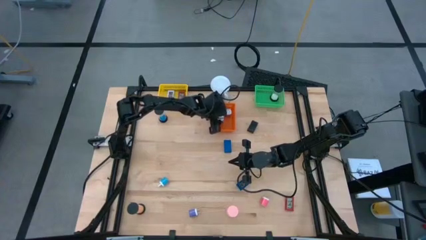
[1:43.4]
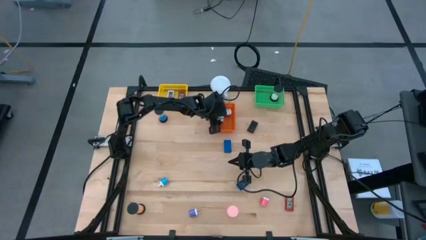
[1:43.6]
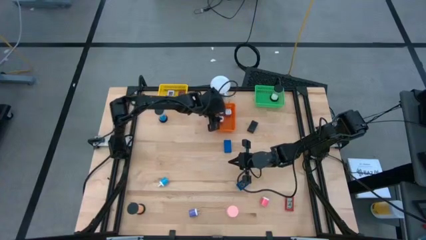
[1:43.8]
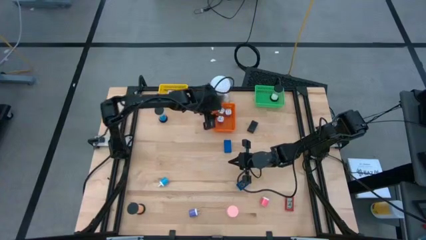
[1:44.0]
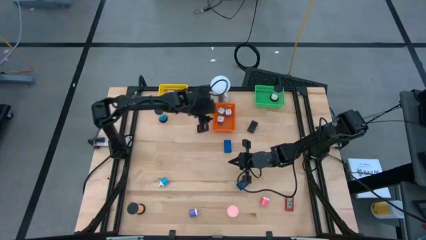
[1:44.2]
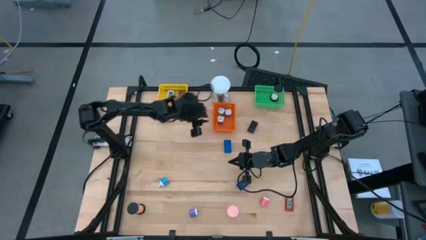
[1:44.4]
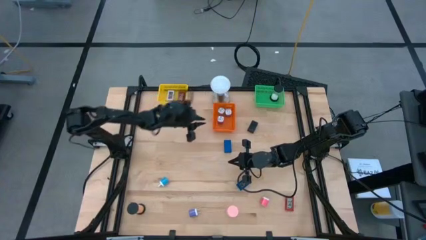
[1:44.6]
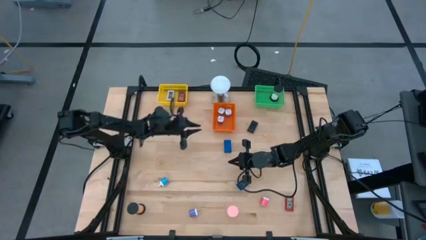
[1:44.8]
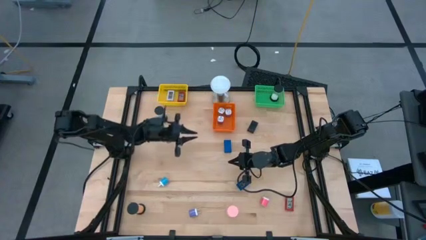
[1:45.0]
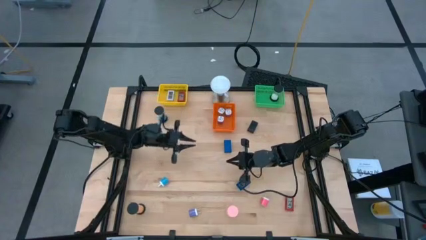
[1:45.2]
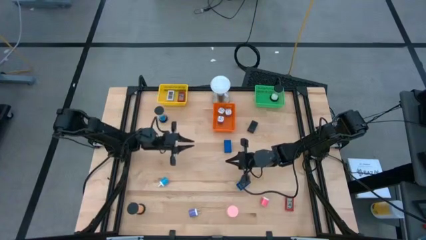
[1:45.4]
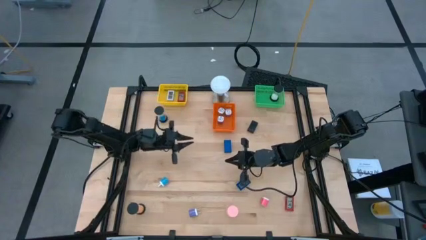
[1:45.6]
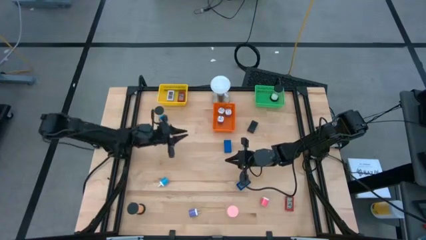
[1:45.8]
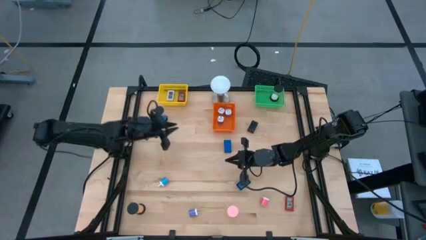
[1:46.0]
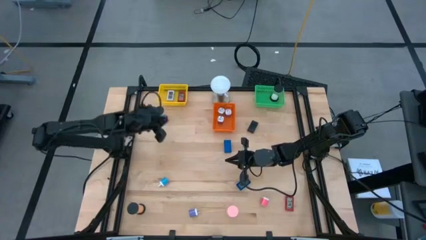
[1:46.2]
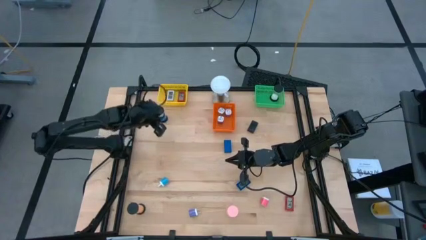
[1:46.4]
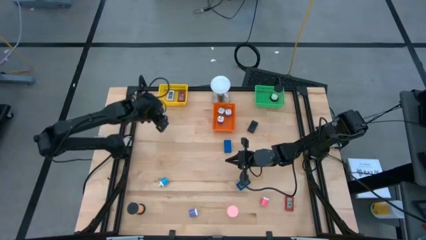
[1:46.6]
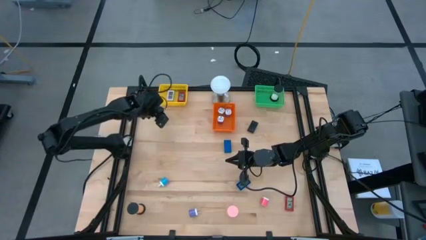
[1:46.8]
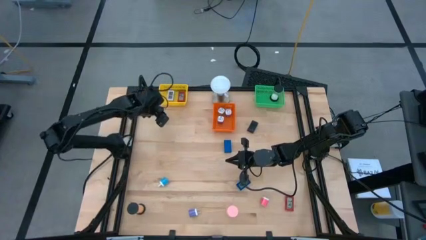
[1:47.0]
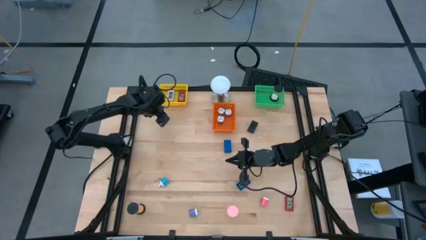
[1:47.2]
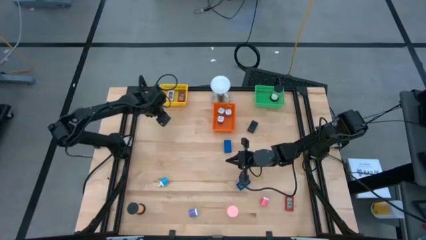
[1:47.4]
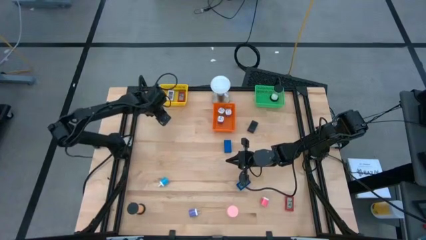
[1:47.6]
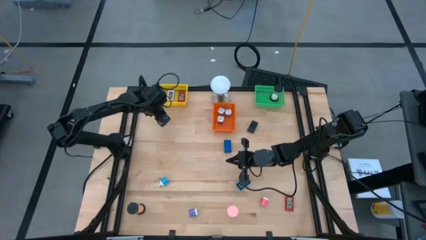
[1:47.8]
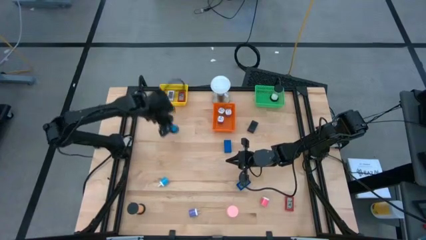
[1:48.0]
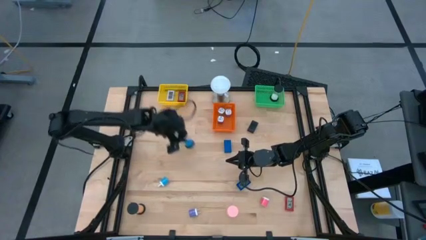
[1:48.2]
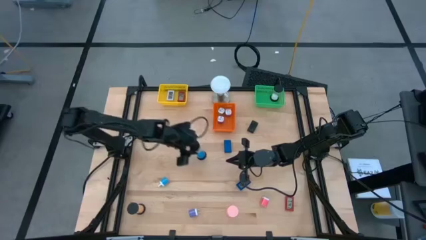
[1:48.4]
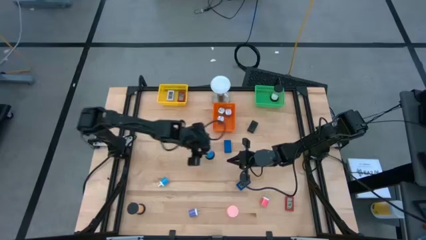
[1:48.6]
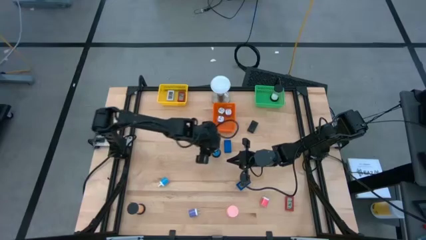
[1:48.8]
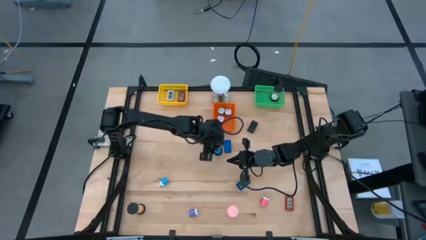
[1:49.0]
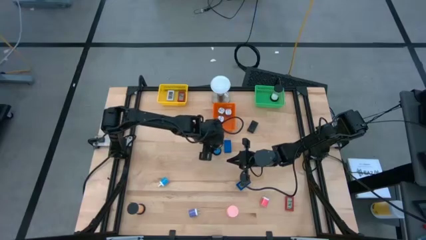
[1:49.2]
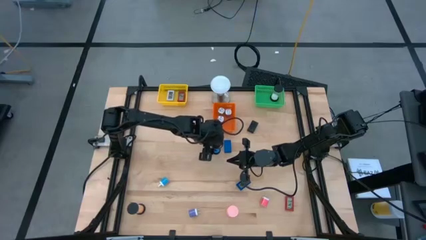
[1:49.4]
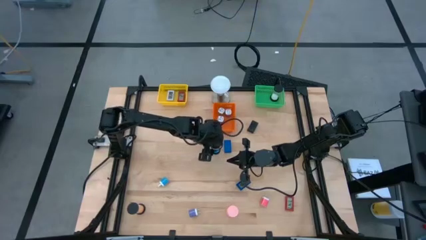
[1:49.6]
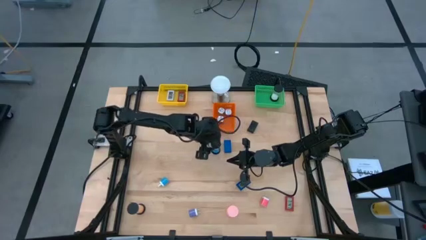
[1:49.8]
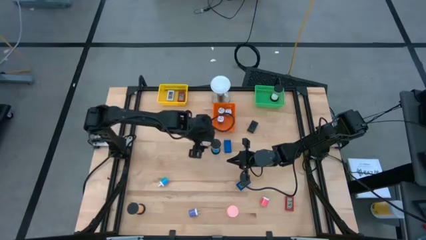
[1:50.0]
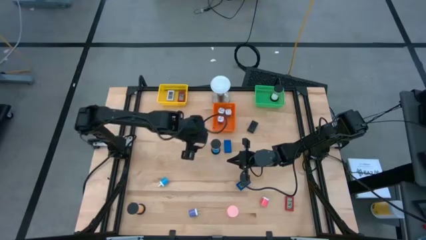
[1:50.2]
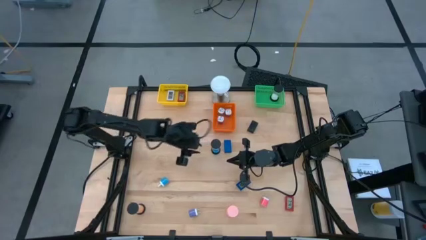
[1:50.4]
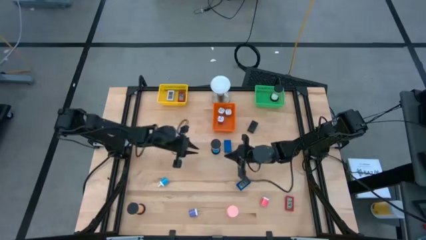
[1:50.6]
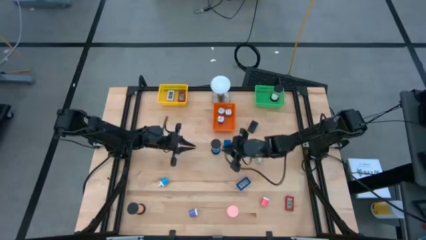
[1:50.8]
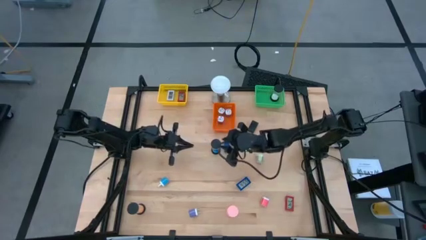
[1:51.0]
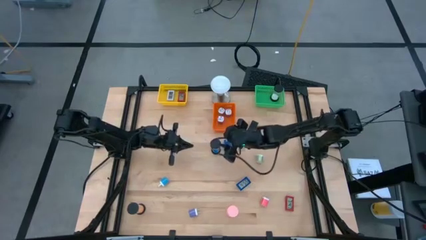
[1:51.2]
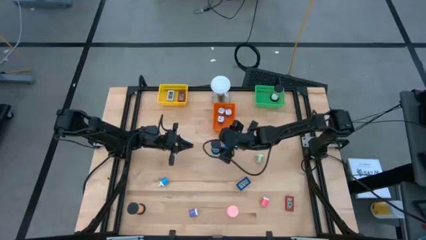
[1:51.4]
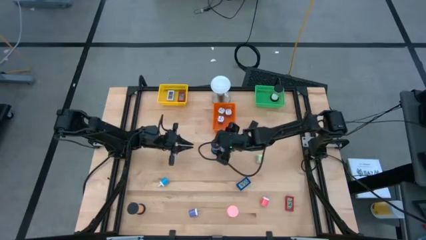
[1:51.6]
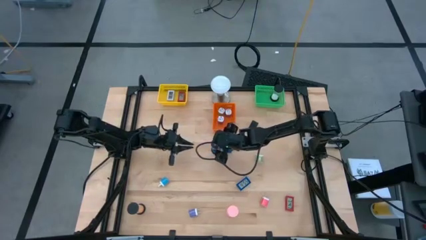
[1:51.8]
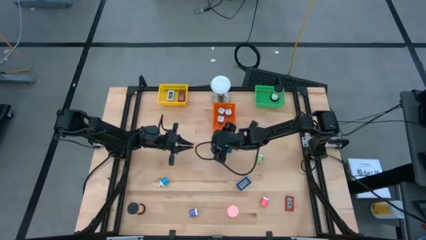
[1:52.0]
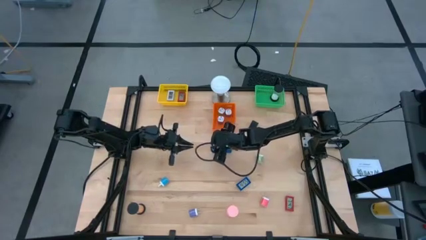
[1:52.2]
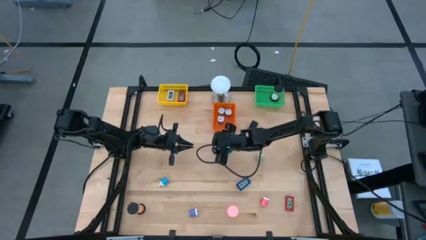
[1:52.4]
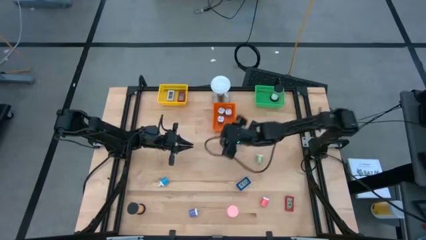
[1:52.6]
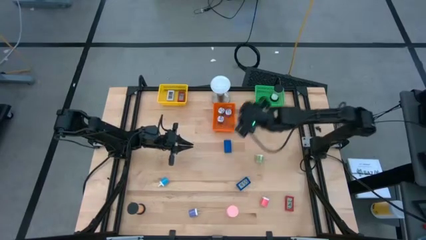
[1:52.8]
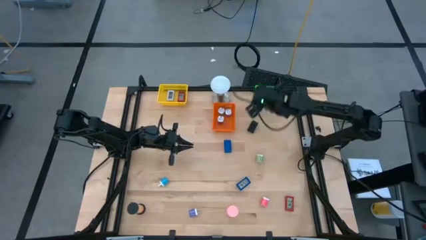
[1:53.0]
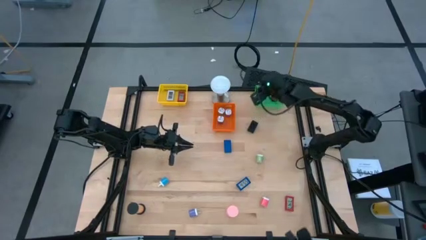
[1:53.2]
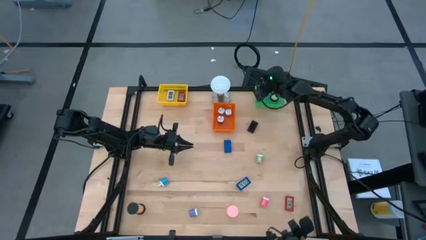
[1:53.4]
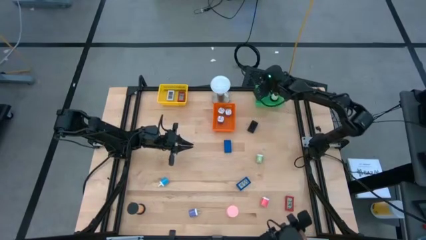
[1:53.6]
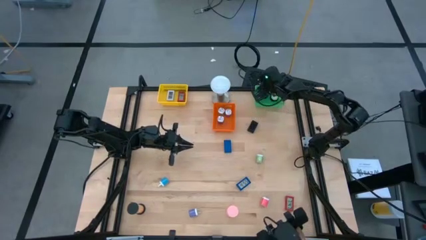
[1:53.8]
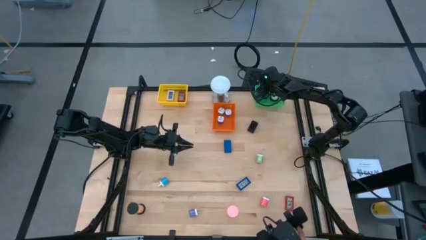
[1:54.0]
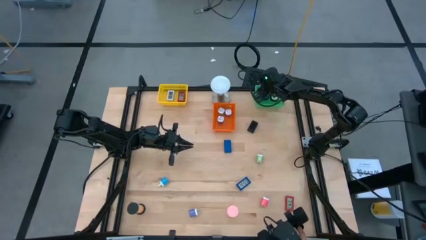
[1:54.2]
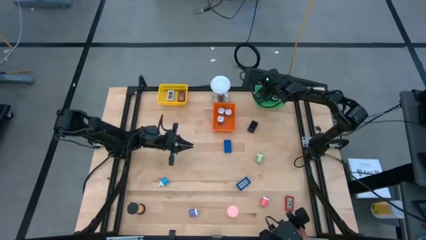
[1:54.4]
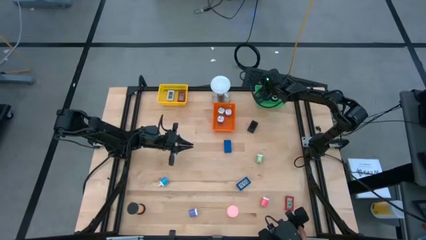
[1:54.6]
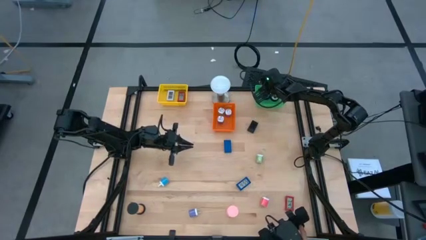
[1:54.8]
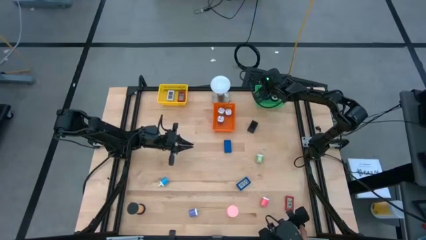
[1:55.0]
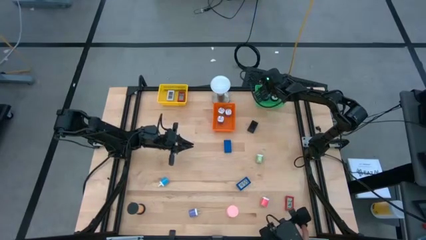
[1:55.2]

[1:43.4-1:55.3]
Task: Pick & Place Office items
Put the blue sandglass timer into the green bin
